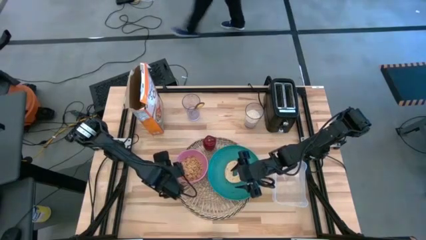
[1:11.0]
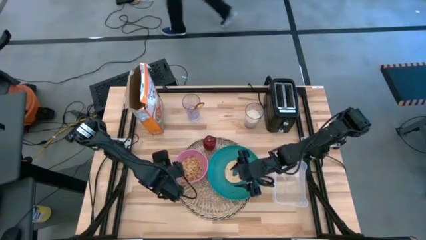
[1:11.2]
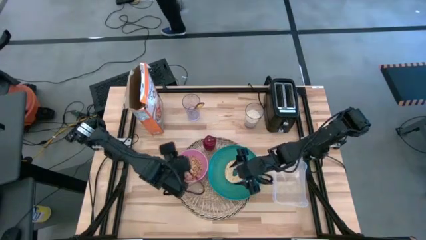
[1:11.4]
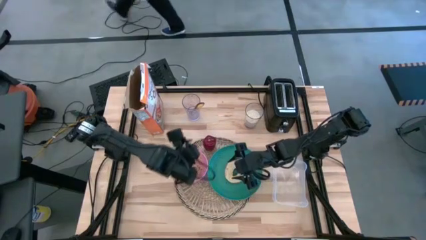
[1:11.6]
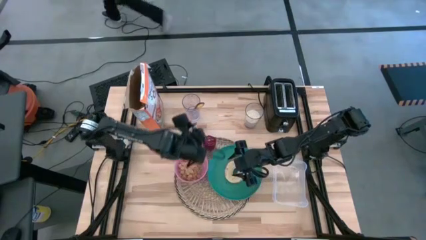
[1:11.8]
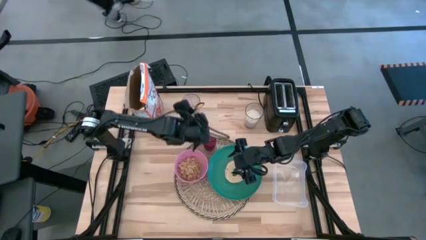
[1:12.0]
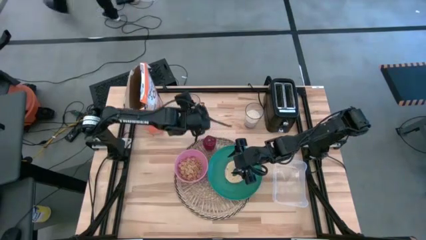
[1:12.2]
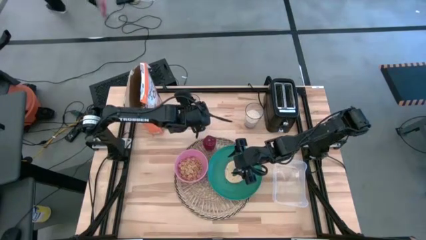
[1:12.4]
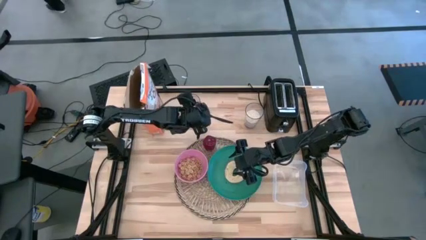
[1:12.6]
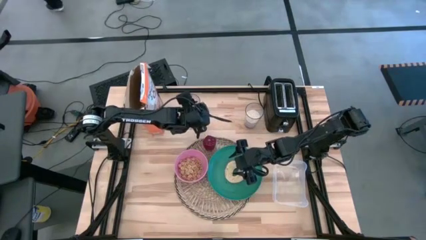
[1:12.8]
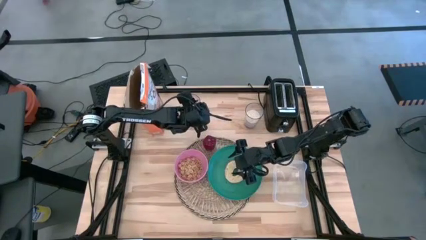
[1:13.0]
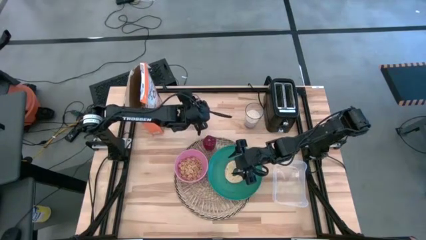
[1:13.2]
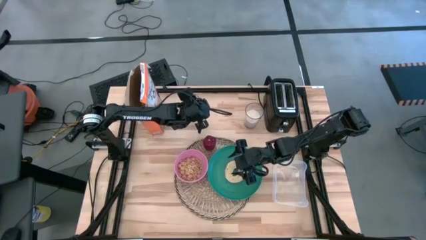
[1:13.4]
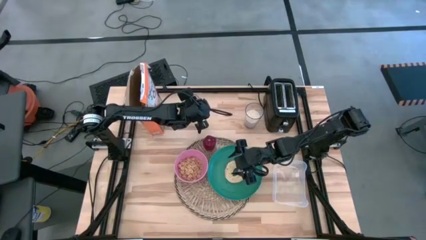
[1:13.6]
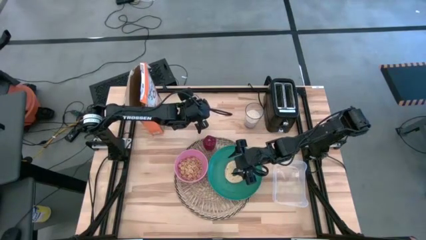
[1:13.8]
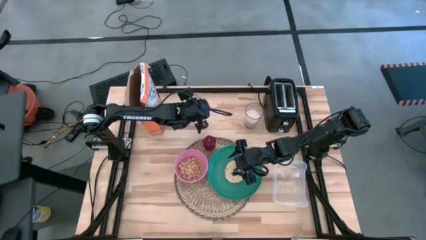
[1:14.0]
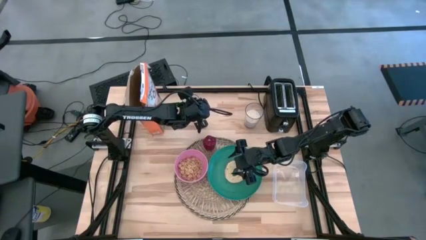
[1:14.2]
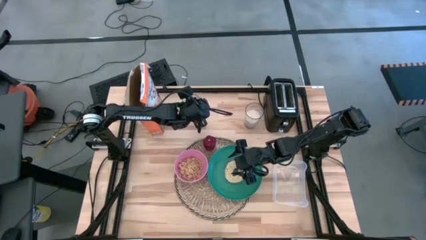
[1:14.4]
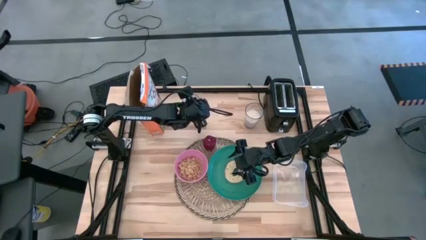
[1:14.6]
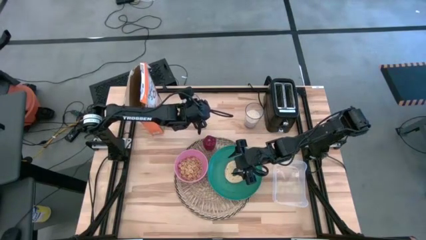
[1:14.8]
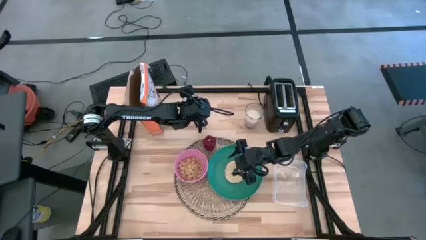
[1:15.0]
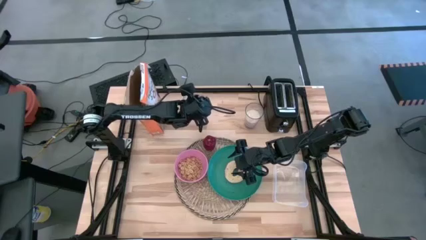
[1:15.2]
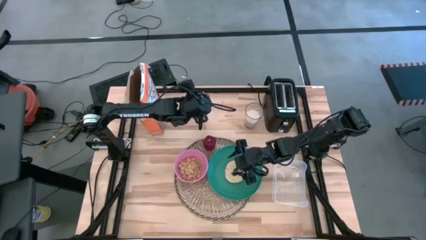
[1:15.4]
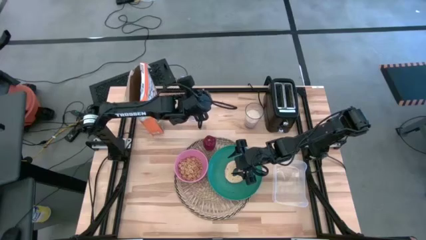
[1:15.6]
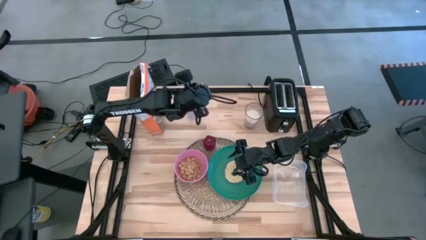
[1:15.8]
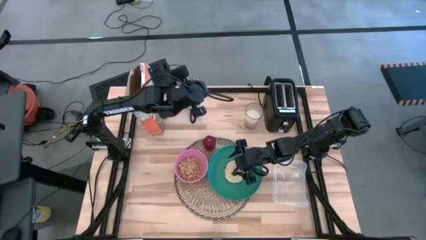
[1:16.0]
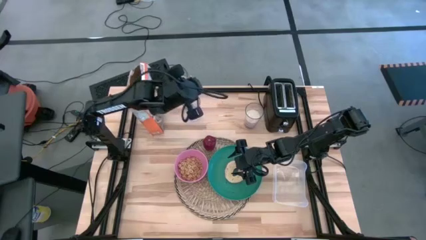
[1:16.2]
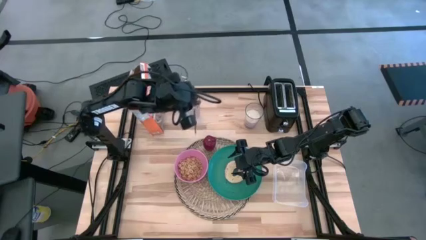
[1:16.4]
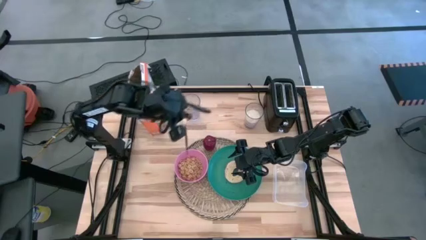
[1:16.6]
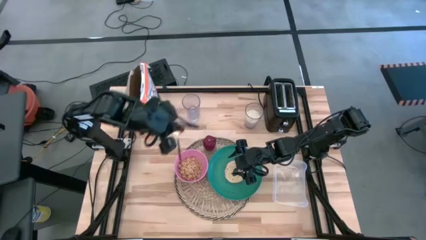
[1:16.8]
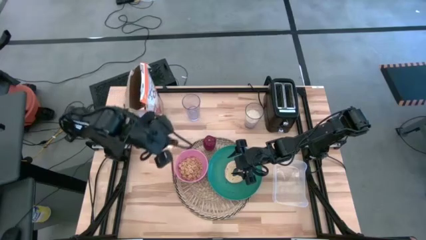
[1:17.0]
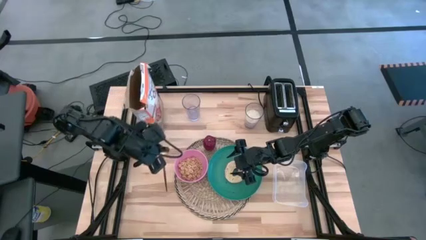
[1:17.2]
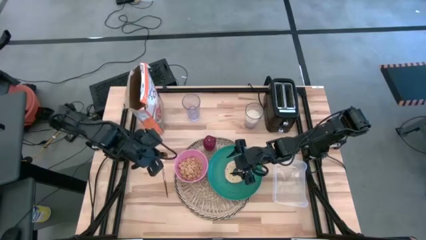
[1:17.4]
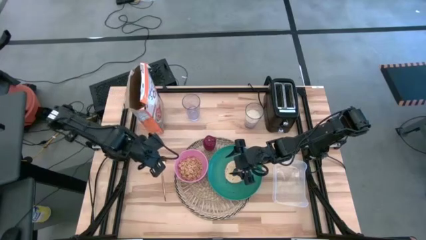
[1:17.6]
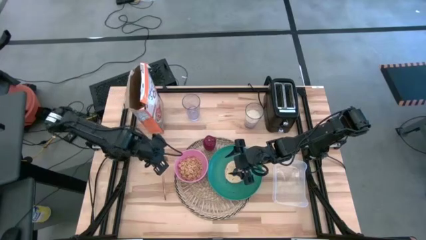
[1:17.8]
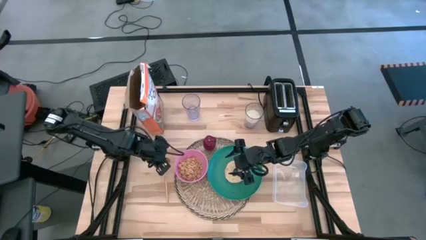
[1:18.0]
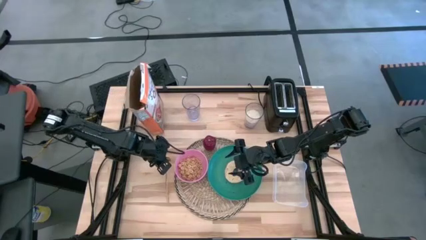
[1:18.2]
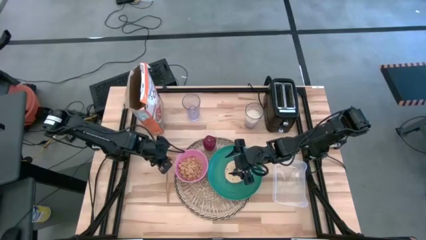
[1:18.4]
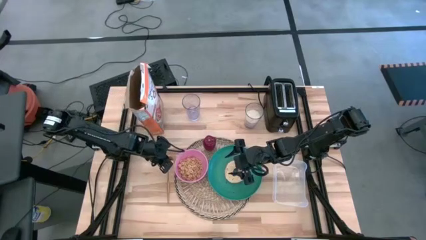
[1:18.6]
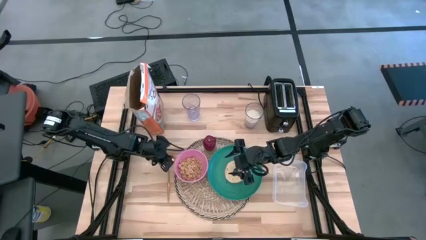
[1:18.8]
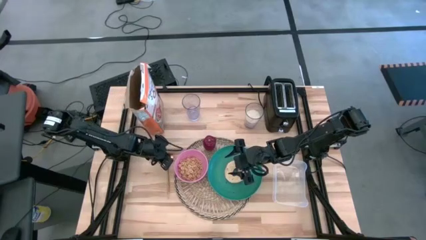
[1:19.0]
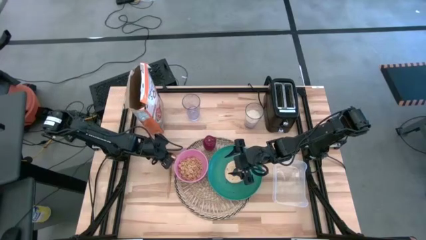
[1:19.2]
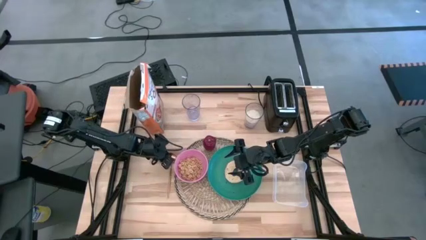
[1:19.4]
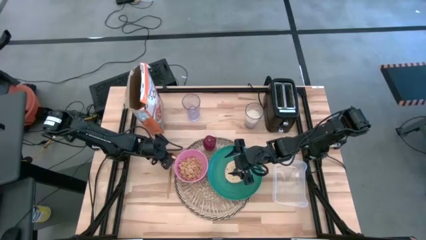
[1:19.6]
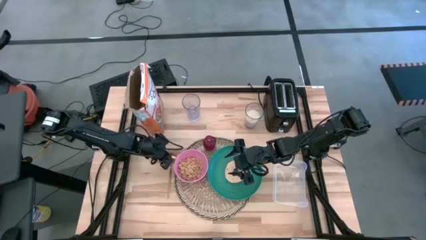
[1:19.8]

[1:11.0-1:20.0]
Task: Arrange a breakfast setting
Put the spoon on the table beside the cereal

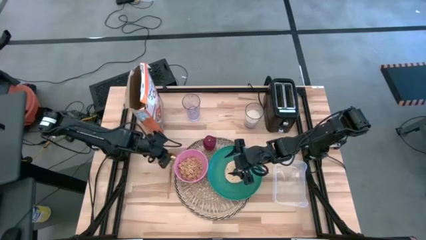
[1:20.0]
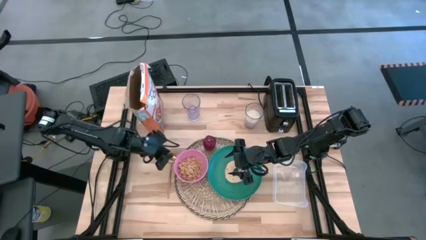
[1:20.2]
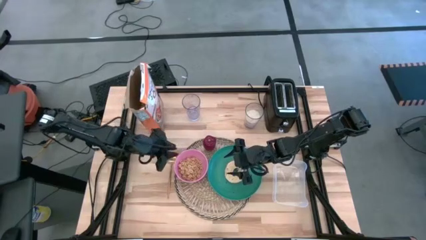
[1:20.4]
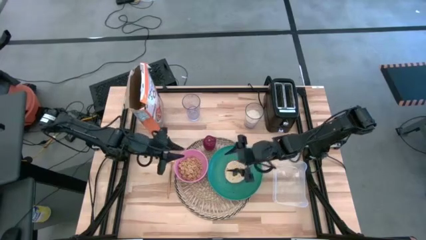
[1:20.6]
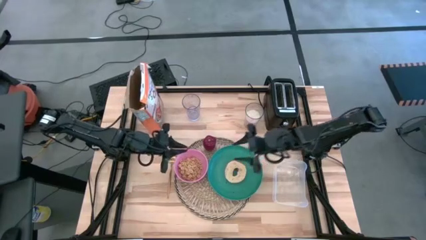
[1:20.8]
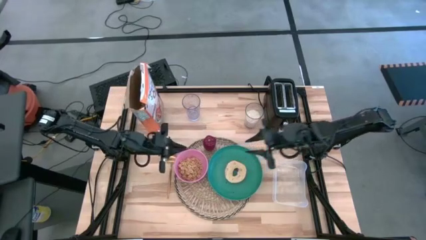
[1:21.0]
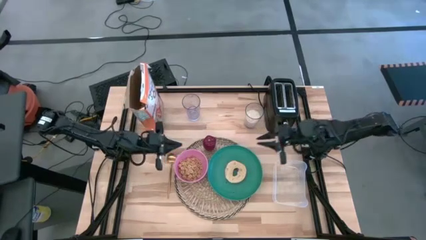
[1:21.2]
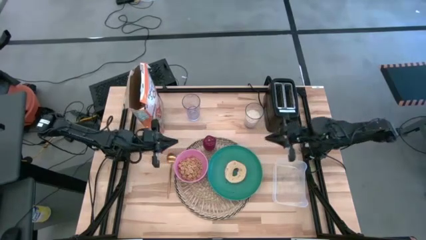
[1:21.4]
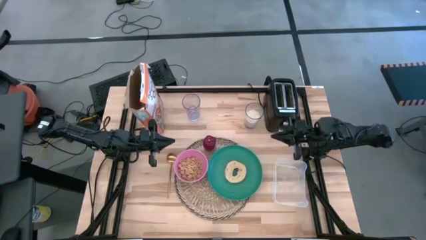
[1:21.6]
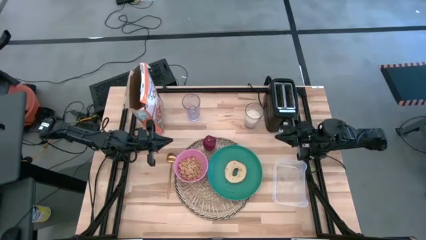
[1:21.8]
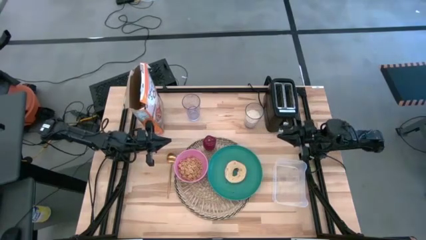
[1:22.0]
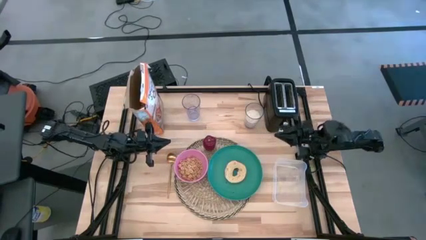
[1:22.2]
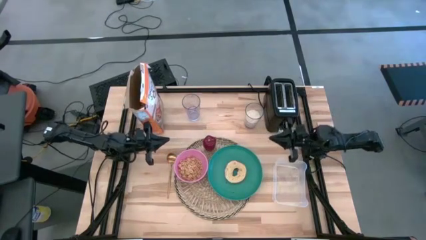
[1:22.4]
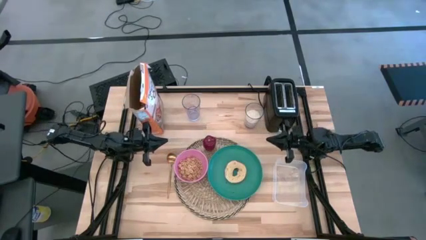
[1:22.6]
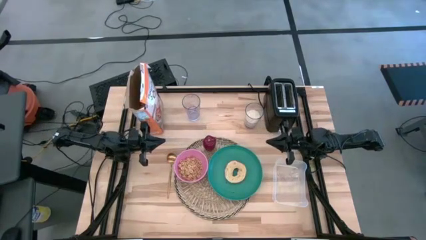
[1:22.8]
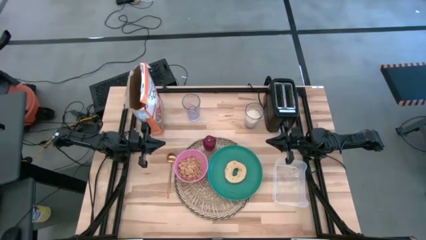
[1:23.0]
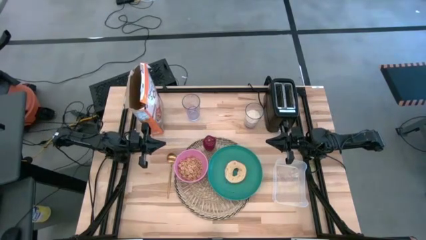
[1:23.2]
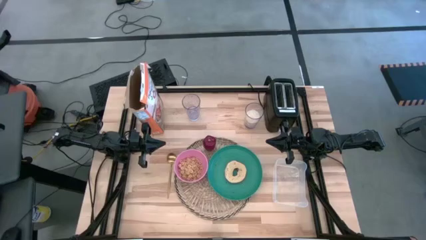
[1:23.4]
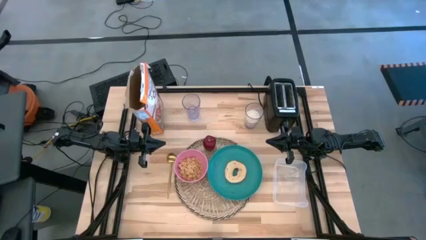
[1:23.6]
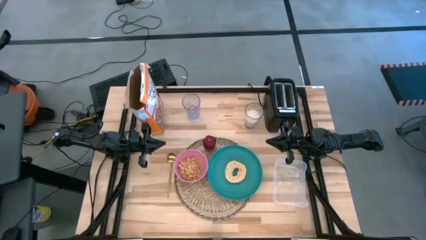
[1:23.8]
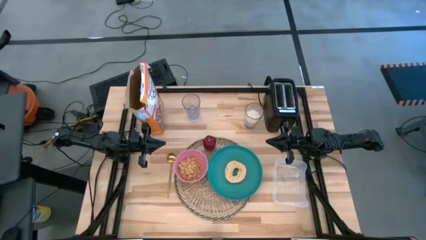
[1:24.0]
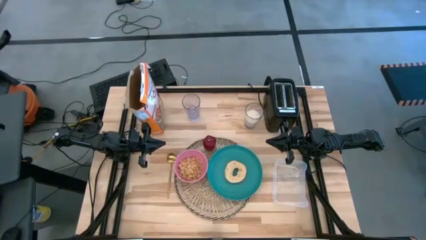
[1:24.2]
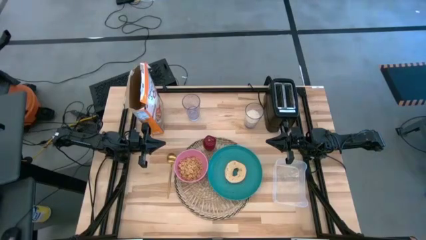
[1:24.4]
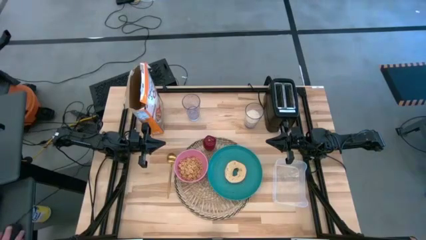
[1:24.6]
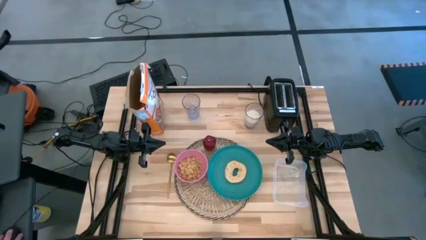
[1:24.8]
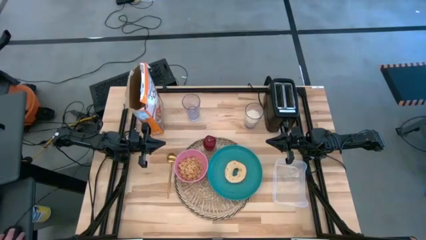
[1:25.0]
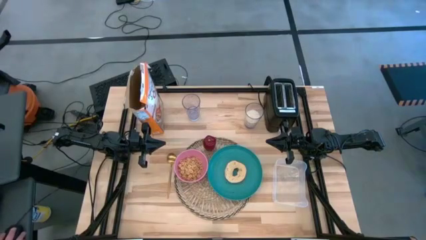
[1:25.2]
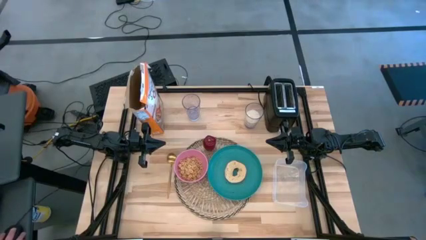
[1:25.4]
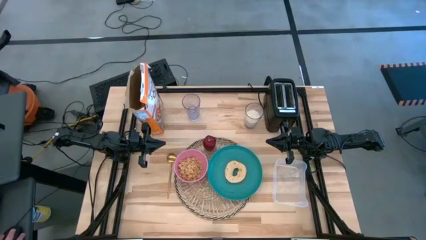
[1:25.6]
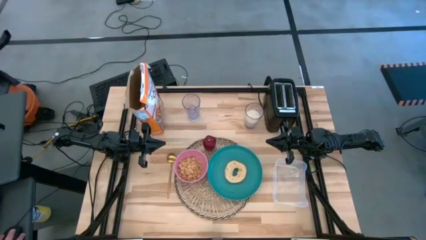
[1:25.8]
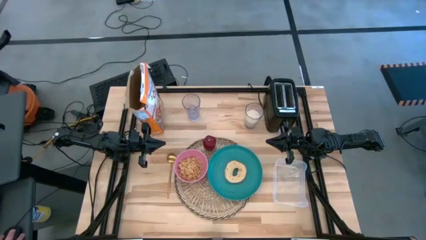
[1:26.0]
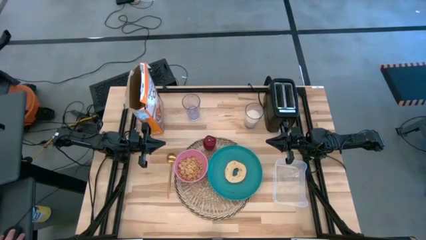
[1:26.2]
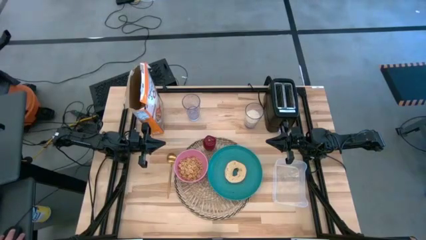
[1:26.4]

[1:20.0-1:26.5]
Return to Home Position

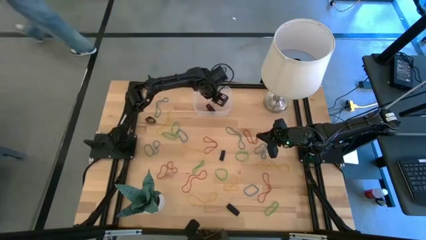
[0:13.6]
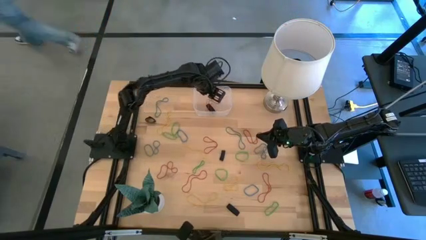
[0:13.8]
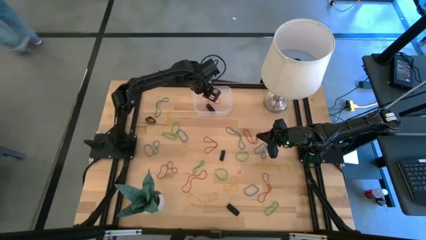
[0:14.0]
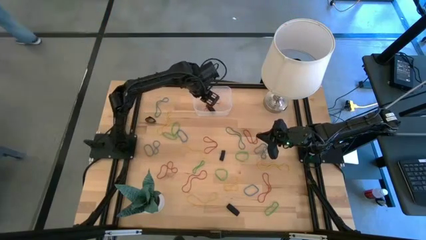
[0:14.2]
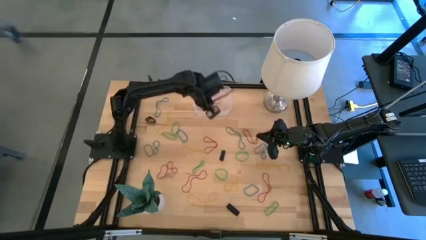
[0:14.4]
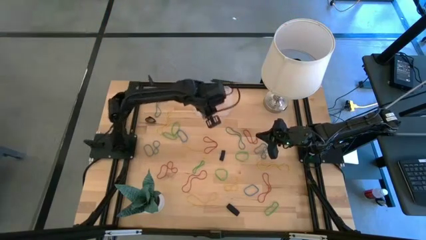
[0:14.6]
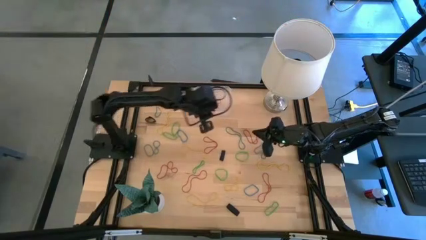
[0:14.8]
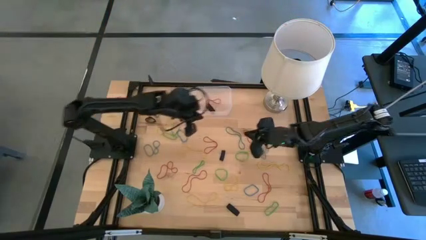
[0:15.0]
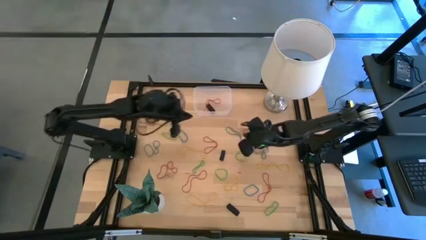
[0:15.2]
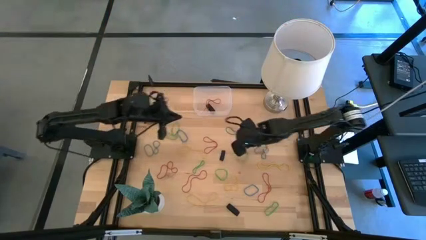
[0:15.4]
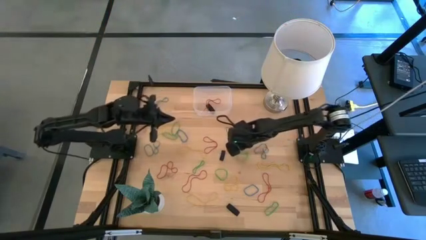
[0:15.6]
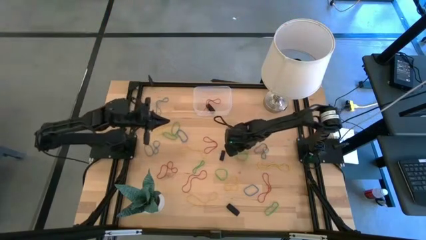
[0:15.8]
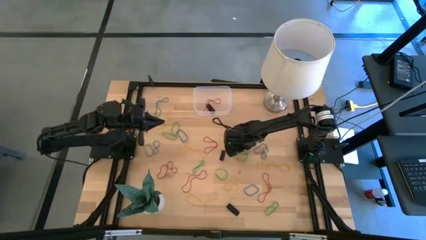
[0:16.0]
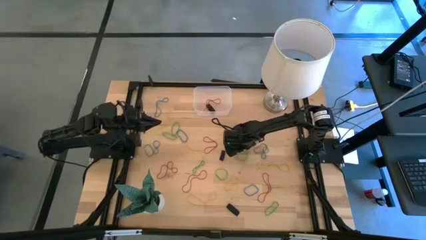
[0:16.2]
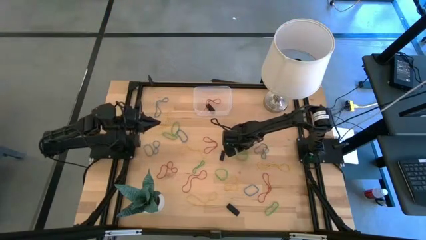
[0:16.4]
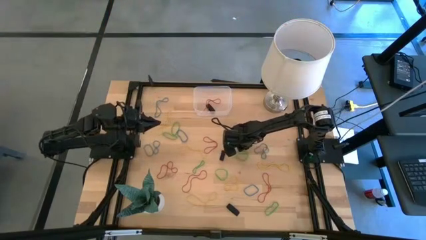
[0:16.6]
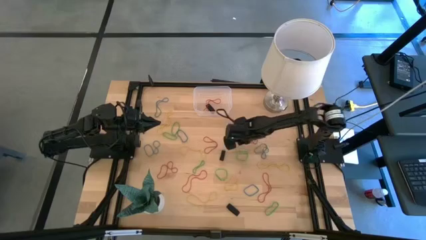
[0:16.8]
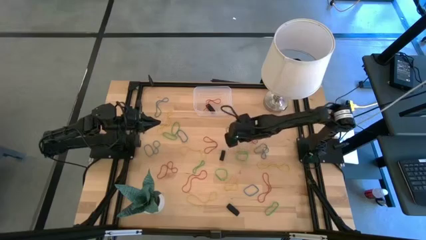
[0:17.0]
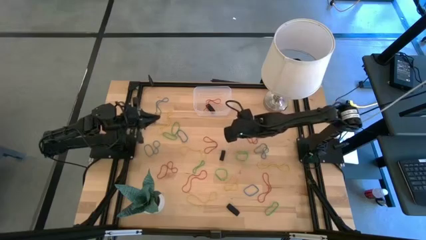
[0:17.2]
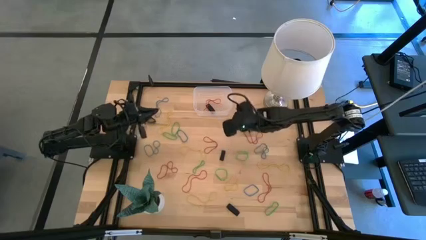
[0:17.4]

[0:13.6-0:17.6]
Task: Pick and place rubber bands into bin
Put the blue rubber band into the transparent bin
